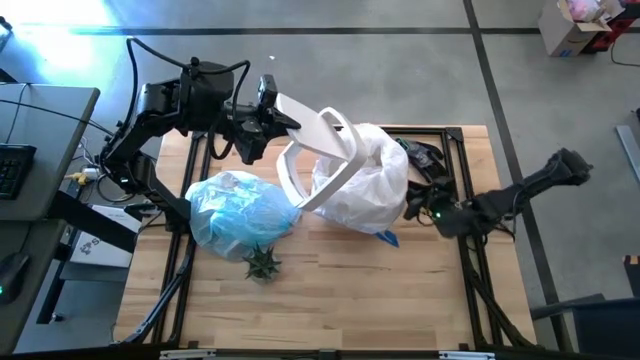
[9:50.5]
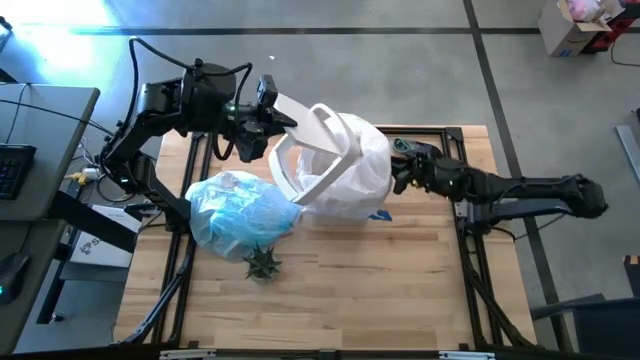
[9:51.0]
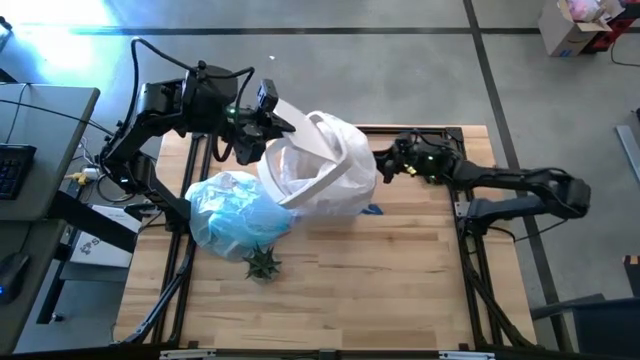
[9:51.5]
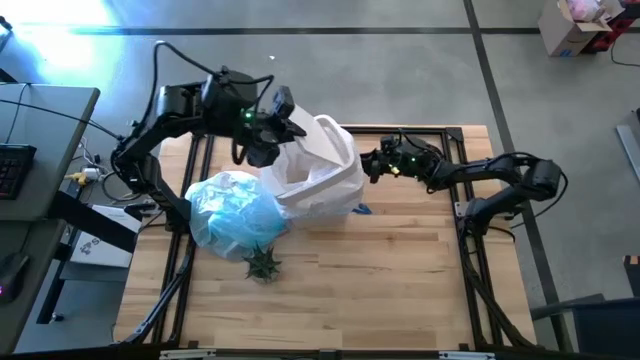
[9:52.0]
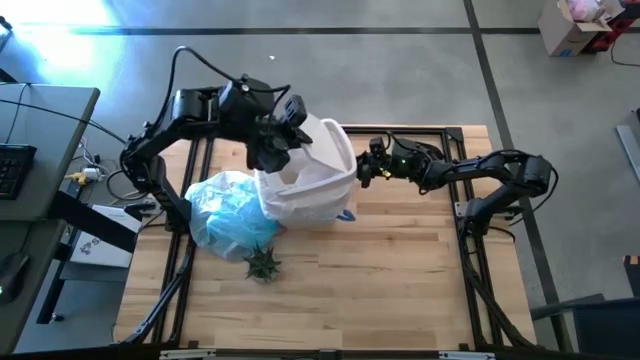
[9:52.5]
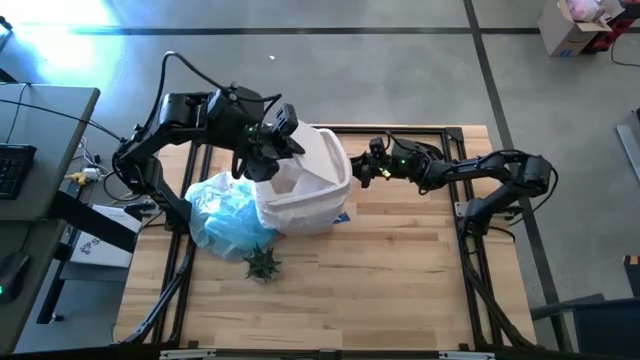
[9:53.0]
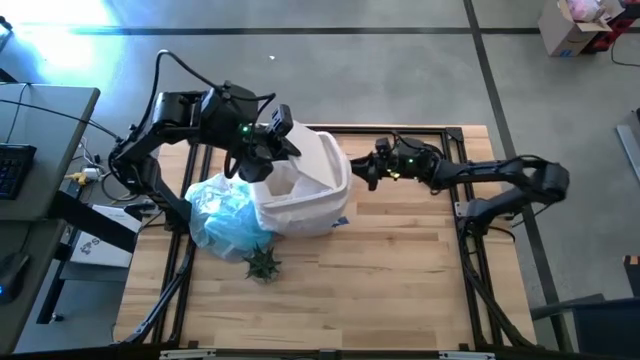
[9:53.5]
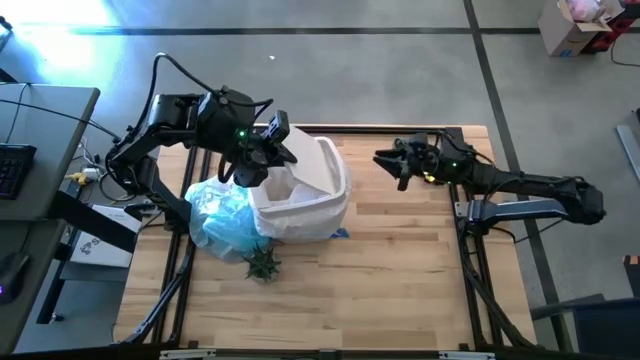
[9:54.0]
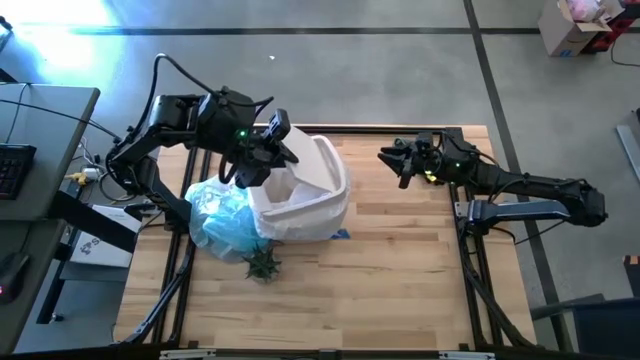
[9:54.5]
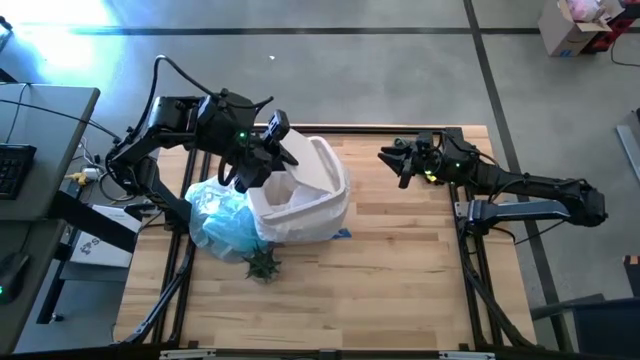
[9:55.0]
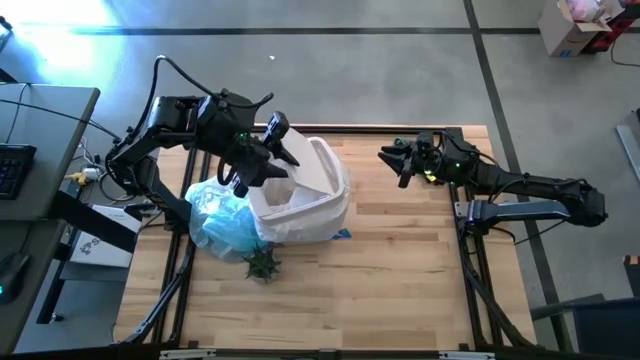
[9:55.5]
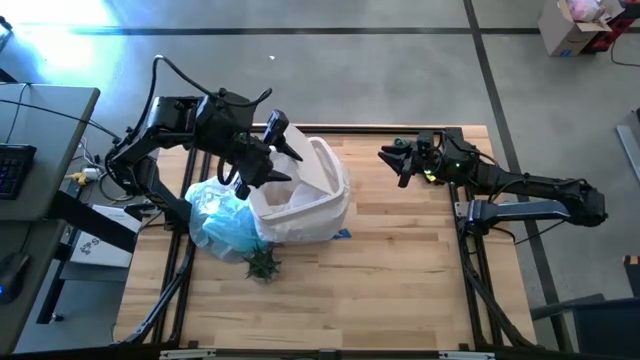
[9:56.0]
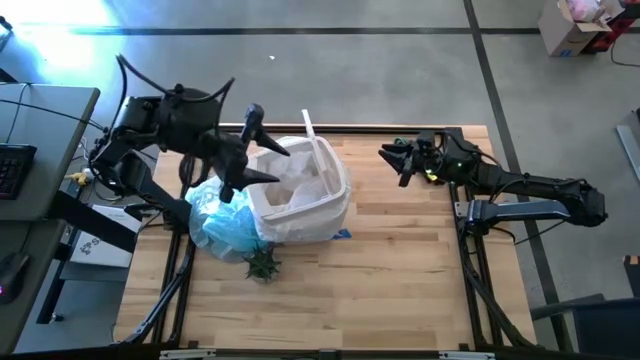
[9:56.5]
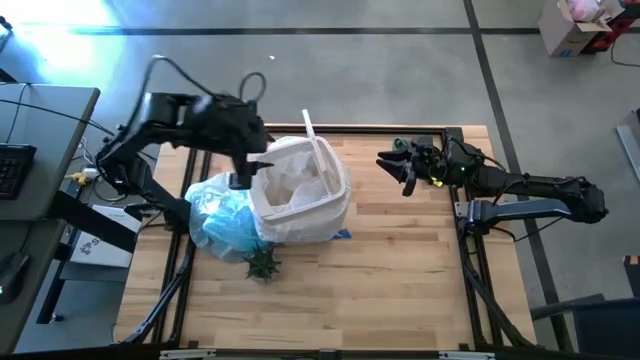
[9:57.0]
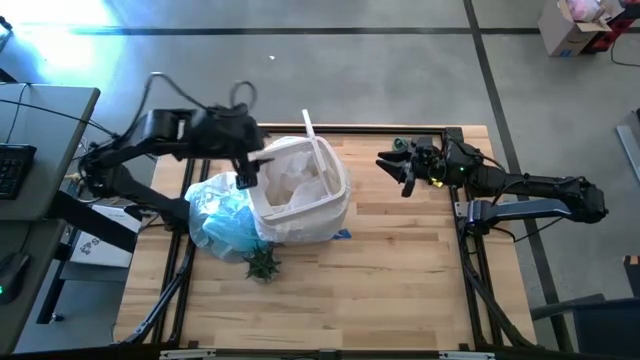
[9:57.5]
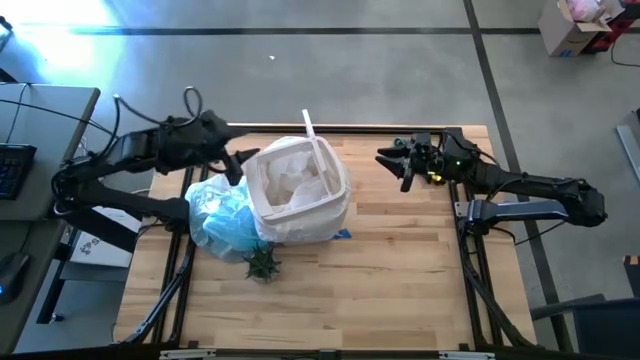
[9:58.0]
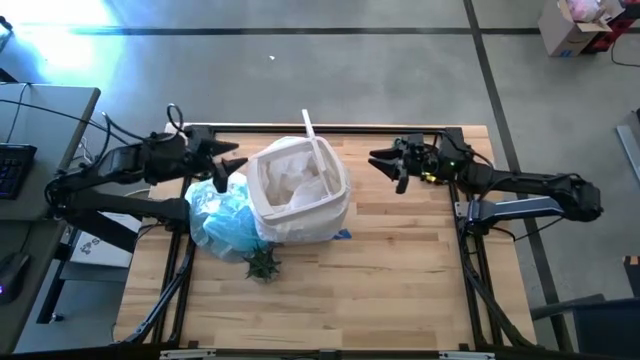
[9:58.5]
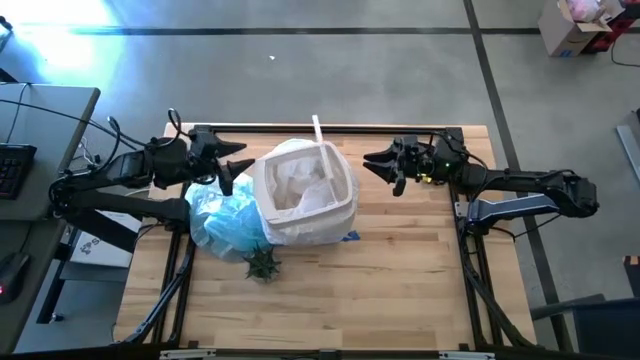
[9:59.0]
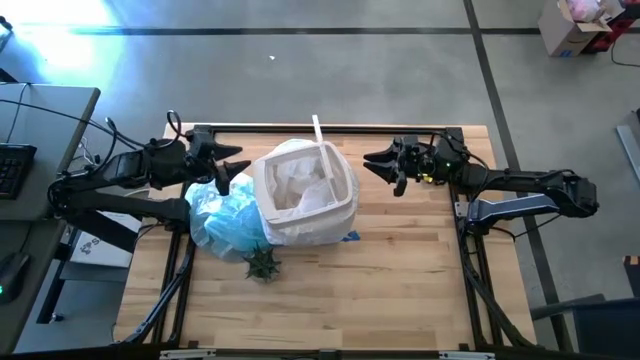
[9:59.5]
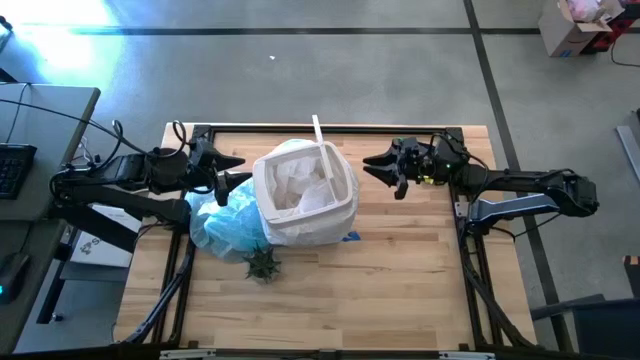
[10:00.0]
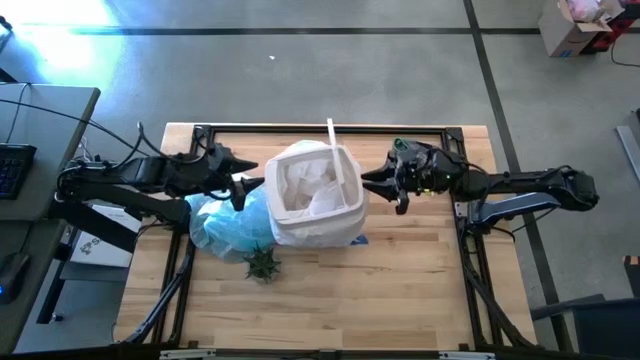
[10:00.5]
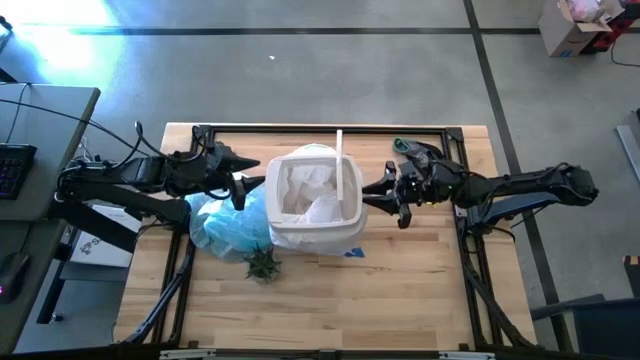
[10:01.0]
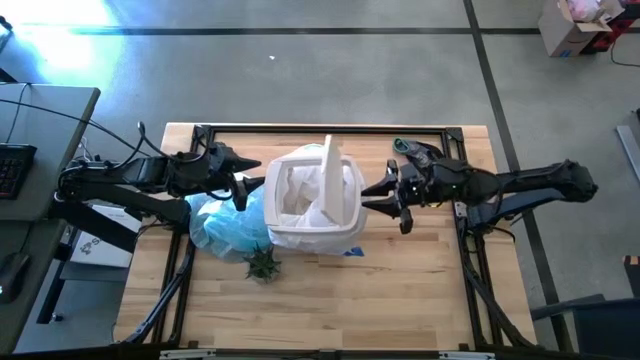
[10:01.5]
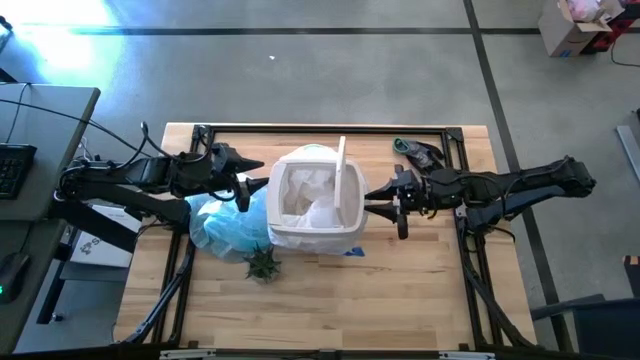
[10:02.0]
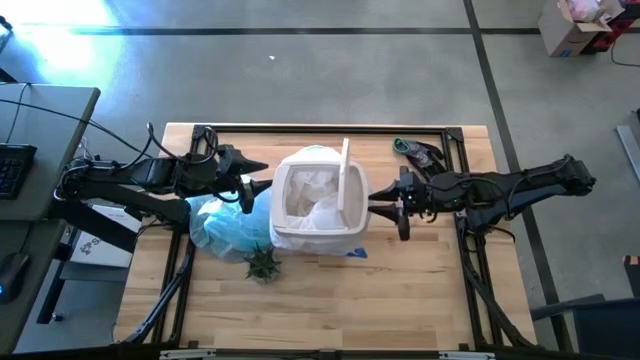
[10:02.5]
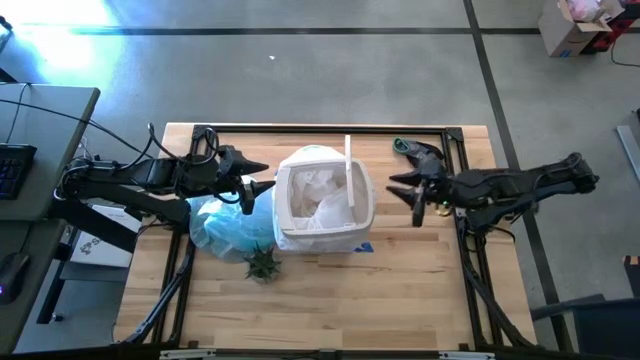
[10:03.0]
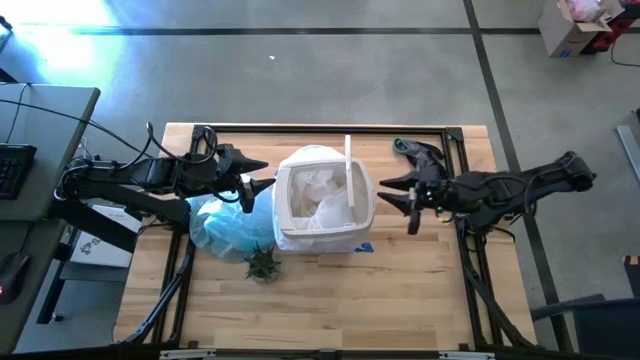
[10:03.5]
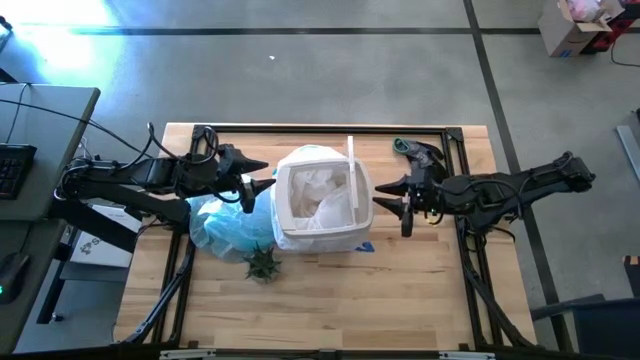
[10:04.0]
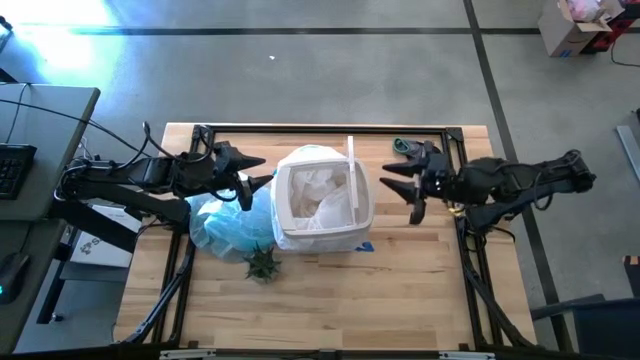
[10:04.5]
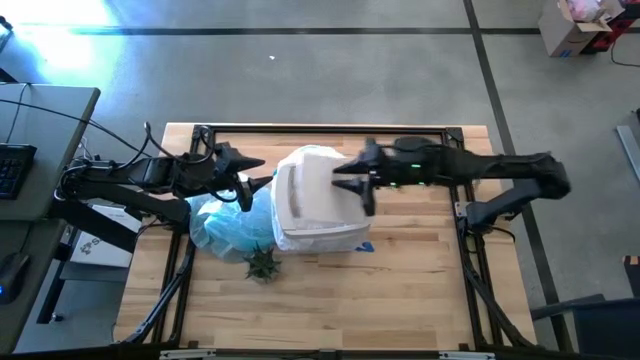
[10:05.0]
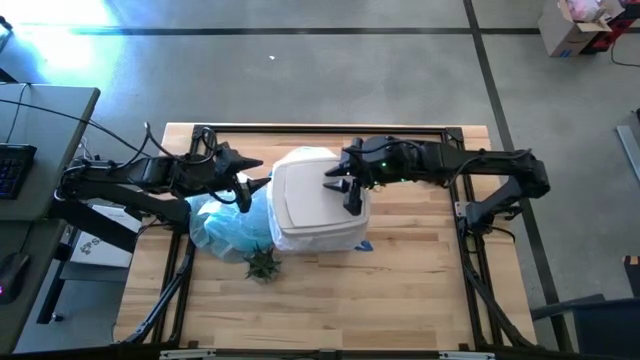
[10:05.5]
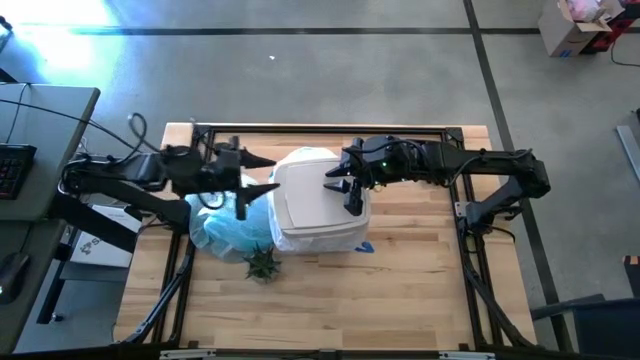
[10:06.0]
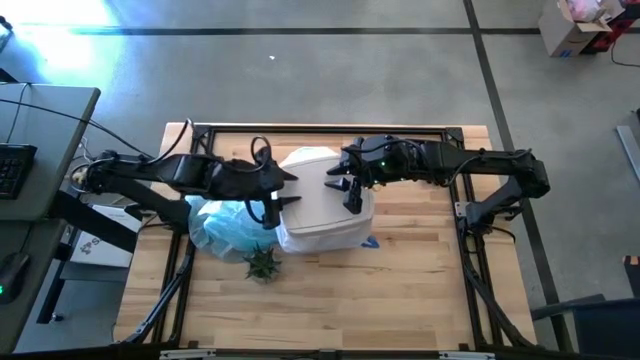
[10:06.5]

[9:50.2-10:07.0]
Task: place trash/remove bag and relplace
Close the trash bin using the trash bin lid

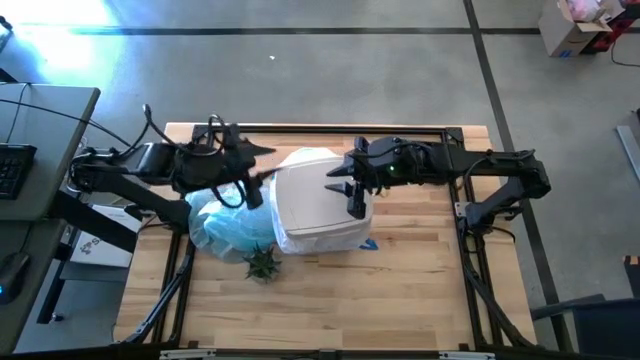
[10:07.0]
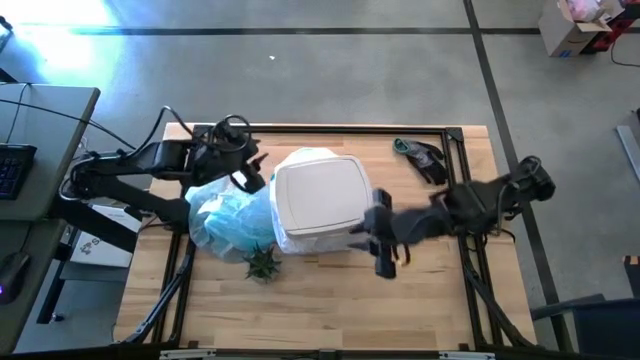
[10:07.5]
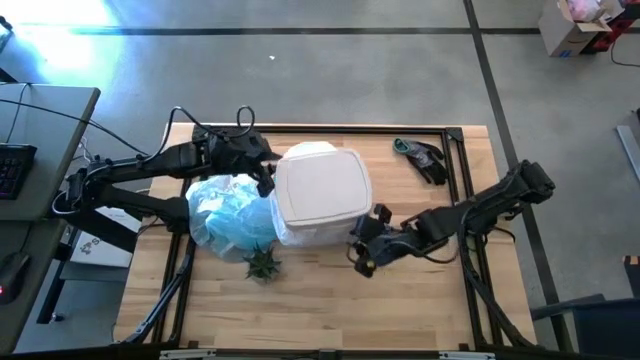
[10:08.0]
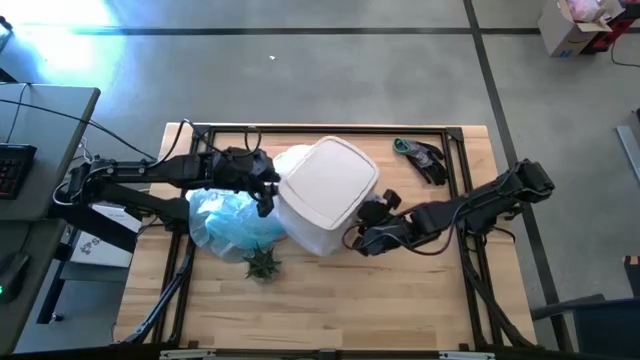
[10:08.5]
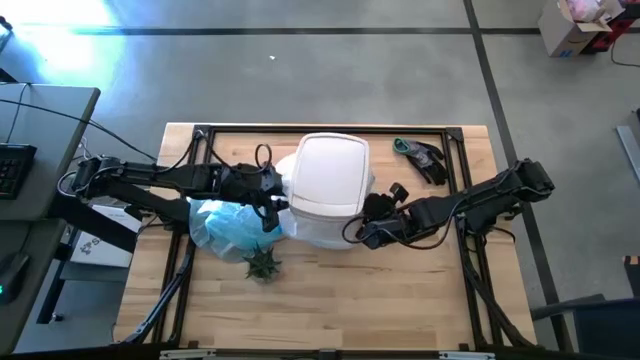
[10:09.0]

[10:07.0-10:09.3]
Adjust the trash bin

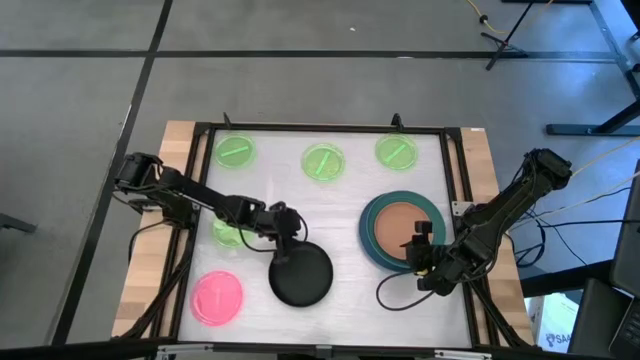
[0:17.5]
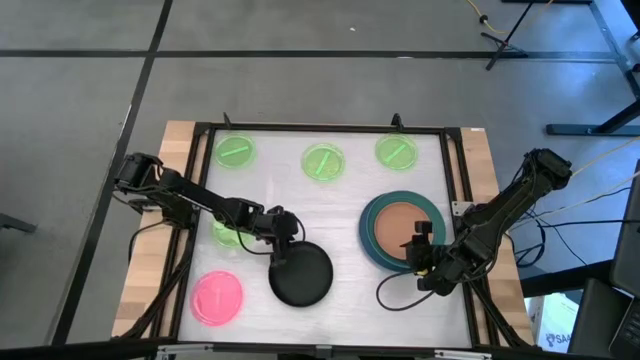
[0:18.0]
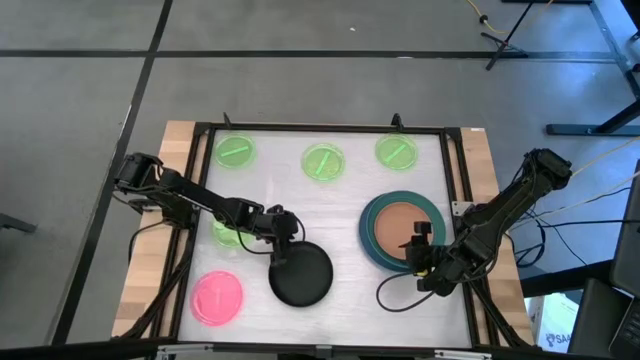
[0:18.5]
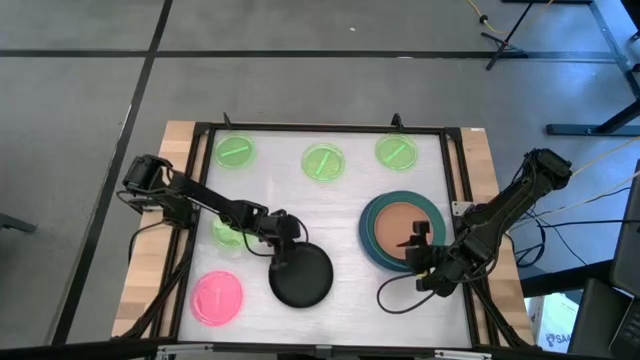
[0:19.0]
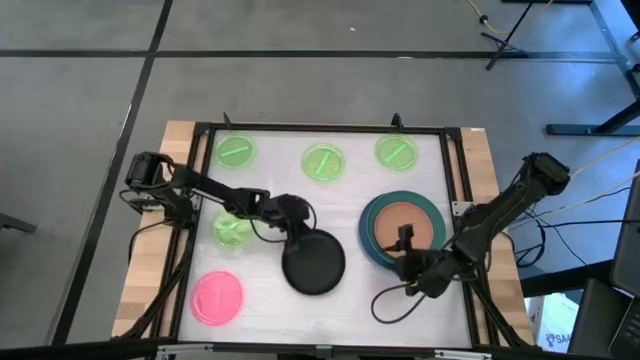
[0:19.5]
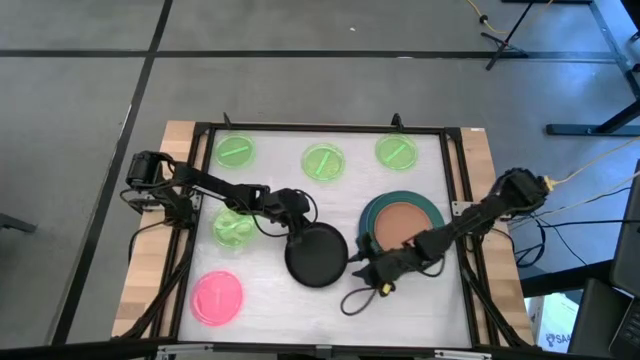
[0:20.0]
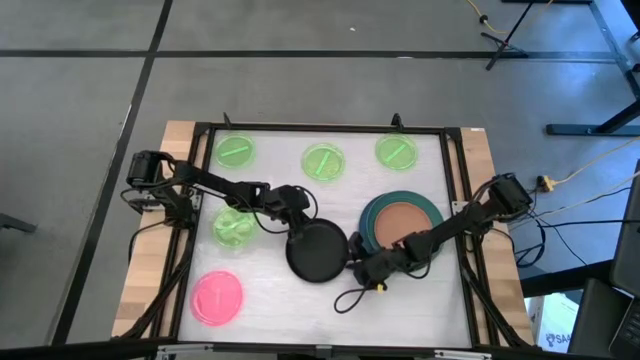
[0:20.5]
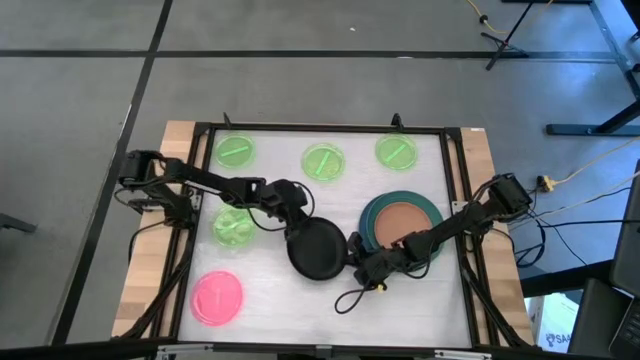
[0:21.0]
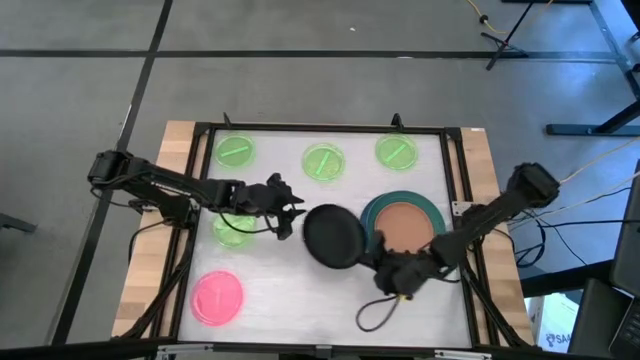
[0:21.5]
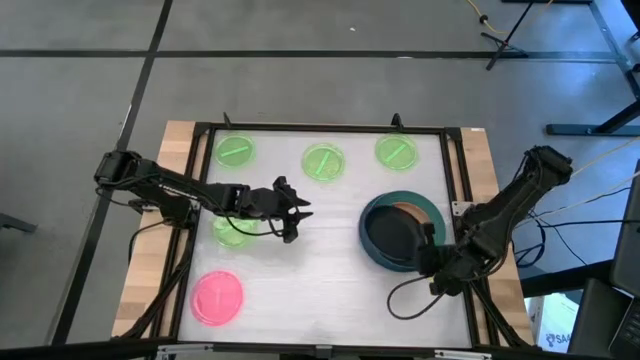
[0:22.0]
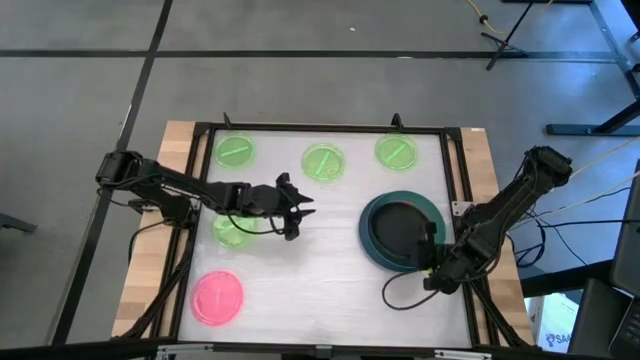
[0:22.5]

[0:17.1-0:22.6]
Task: Stack plastic plates
Stack the black plate into the orange plate
